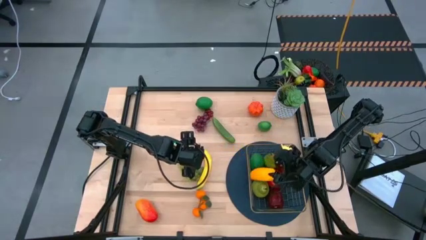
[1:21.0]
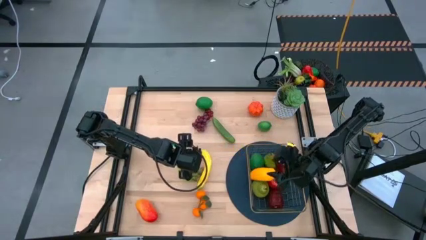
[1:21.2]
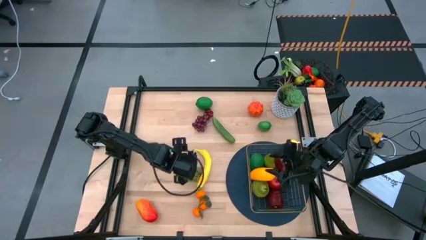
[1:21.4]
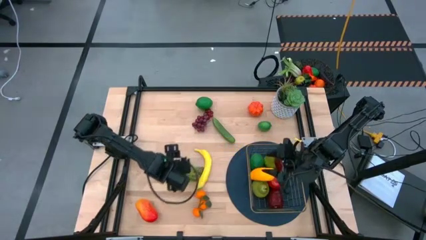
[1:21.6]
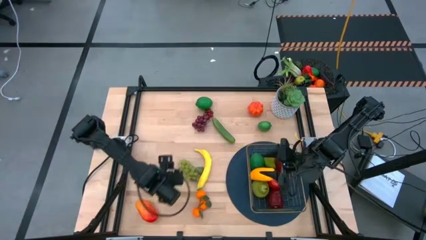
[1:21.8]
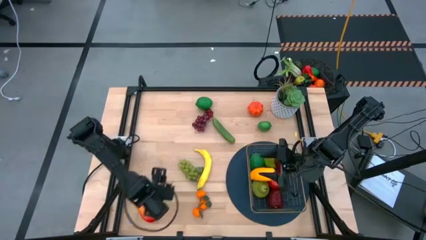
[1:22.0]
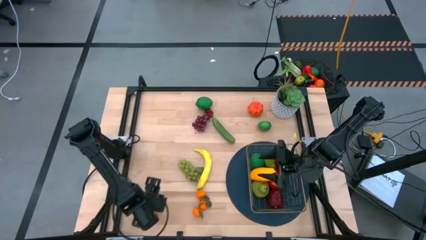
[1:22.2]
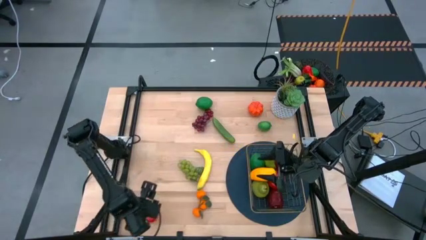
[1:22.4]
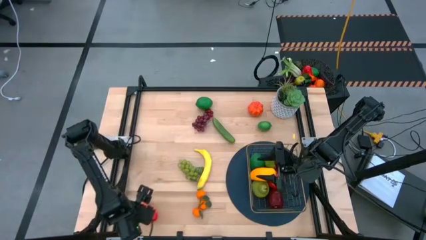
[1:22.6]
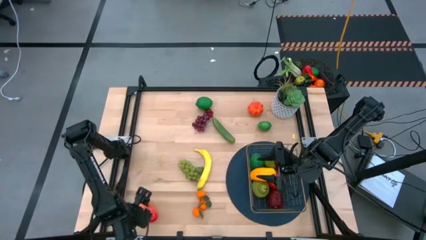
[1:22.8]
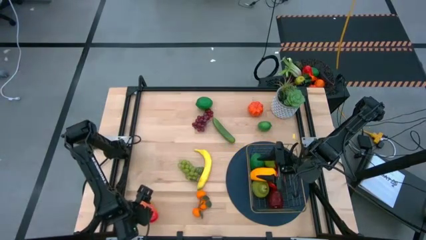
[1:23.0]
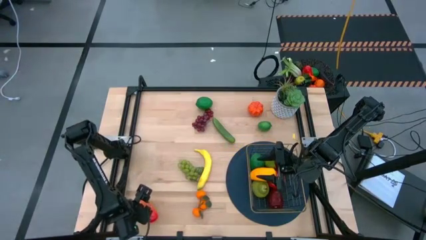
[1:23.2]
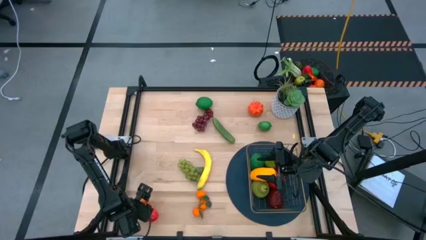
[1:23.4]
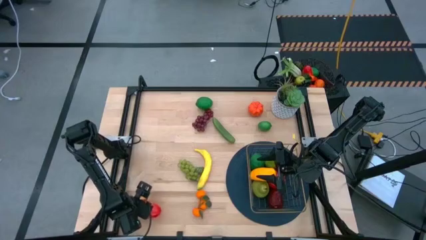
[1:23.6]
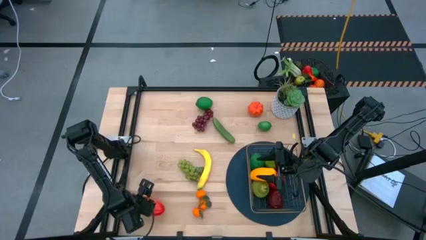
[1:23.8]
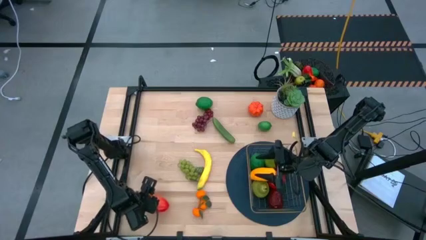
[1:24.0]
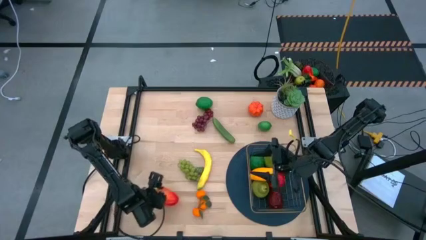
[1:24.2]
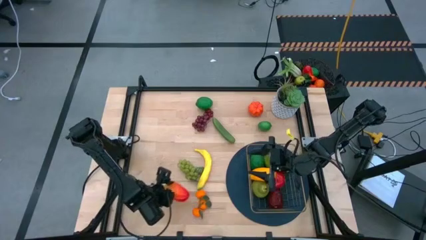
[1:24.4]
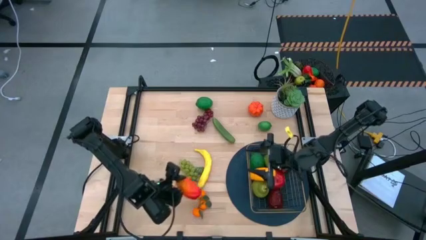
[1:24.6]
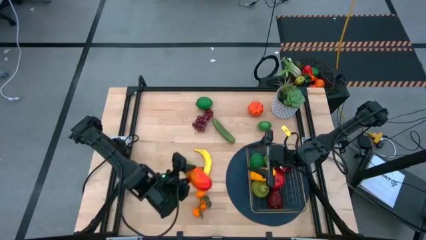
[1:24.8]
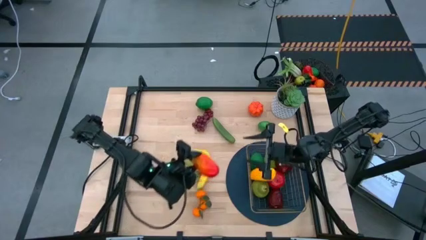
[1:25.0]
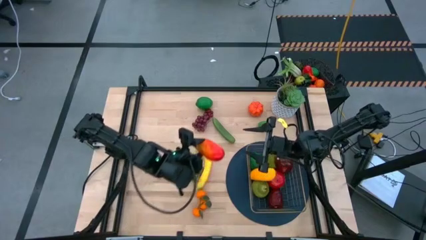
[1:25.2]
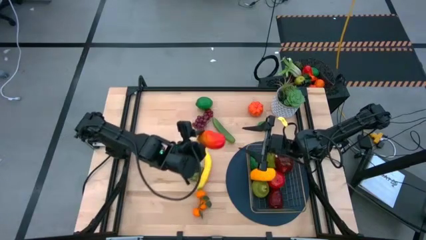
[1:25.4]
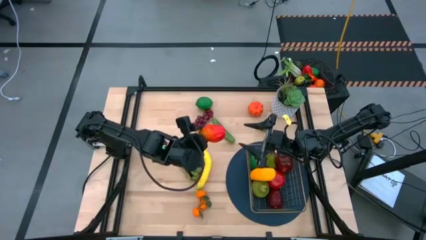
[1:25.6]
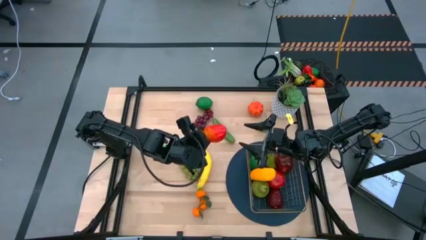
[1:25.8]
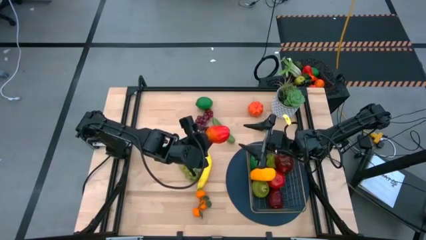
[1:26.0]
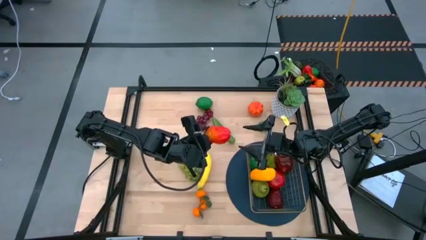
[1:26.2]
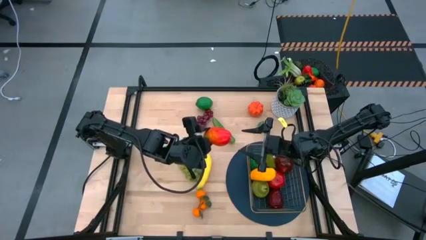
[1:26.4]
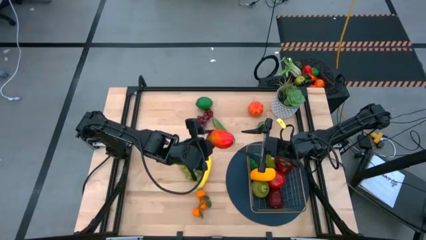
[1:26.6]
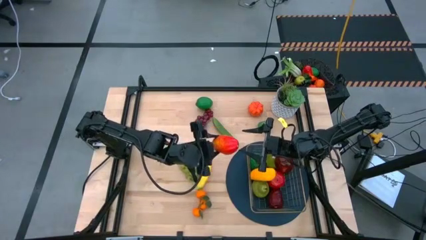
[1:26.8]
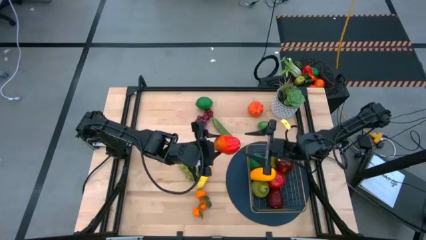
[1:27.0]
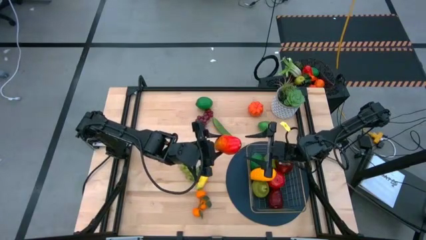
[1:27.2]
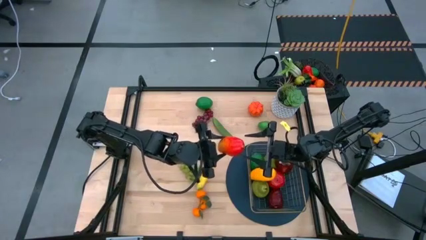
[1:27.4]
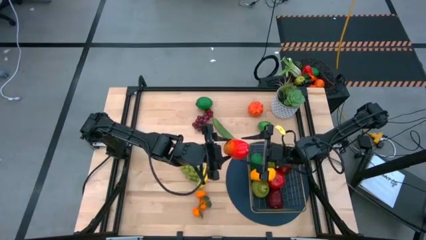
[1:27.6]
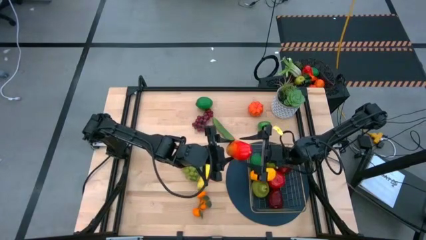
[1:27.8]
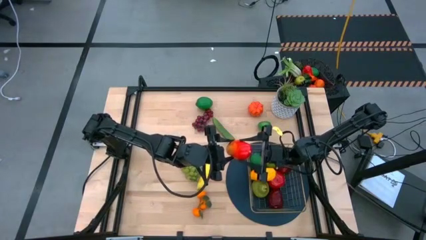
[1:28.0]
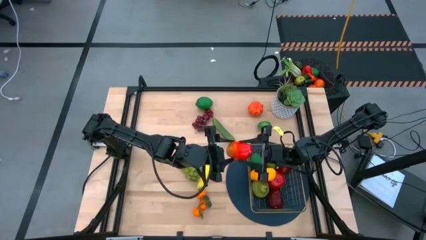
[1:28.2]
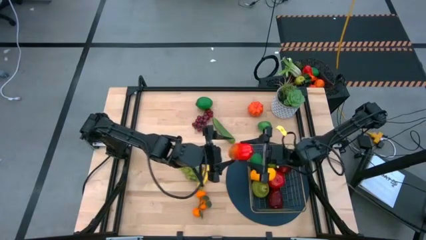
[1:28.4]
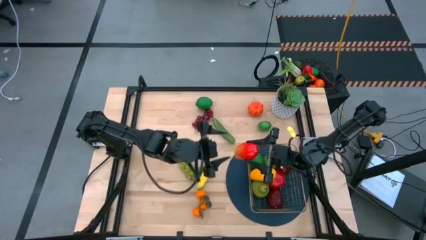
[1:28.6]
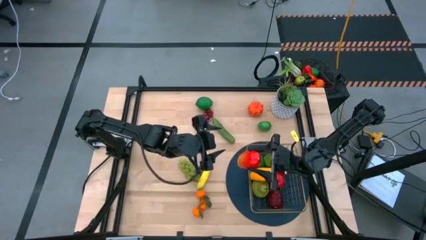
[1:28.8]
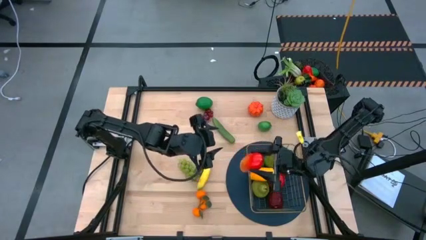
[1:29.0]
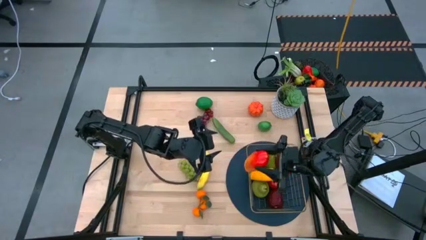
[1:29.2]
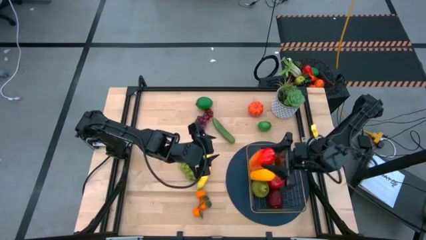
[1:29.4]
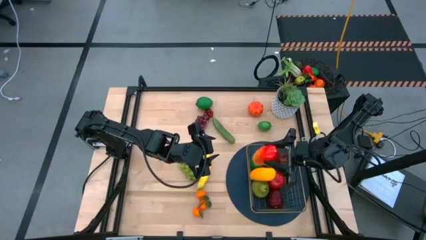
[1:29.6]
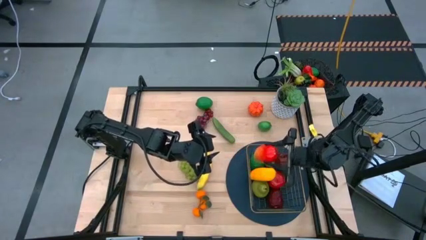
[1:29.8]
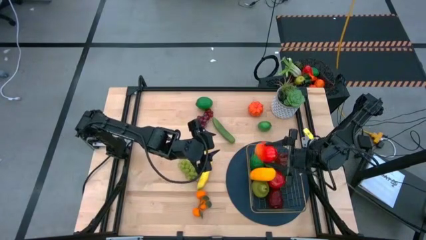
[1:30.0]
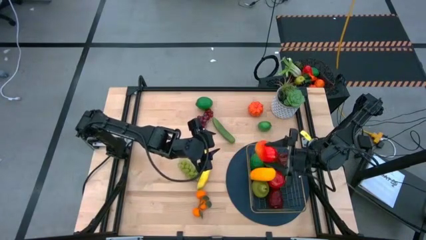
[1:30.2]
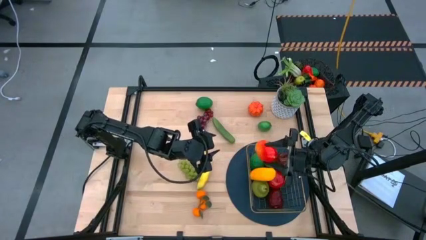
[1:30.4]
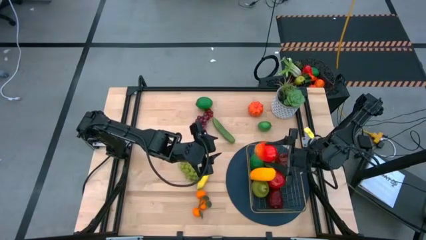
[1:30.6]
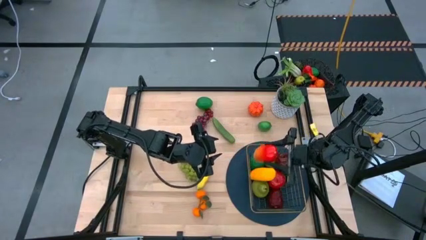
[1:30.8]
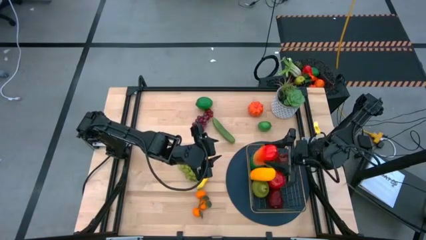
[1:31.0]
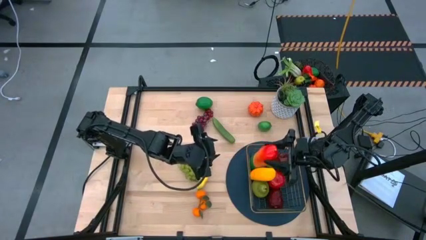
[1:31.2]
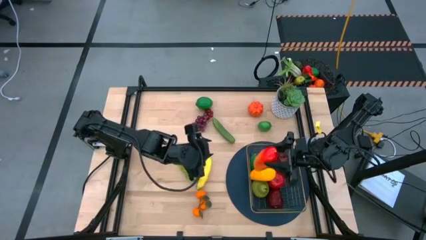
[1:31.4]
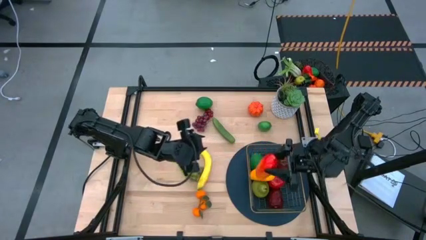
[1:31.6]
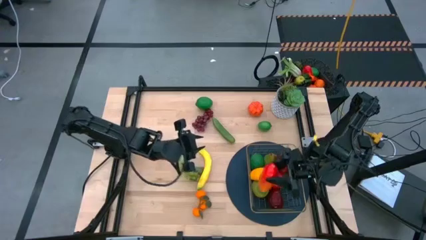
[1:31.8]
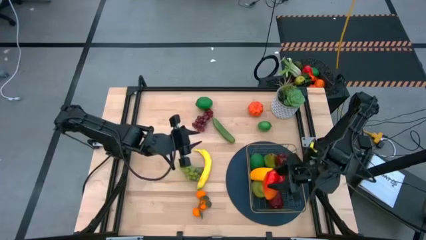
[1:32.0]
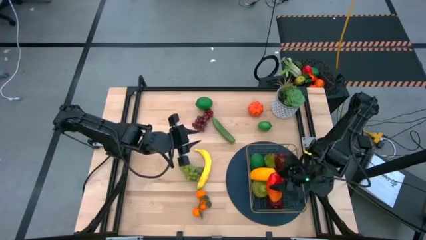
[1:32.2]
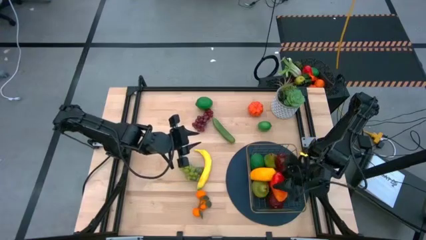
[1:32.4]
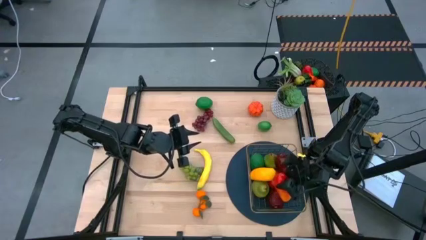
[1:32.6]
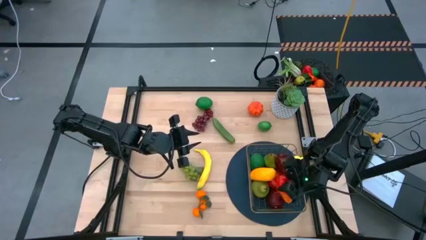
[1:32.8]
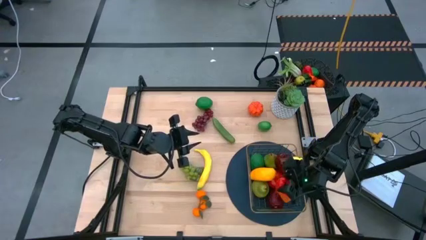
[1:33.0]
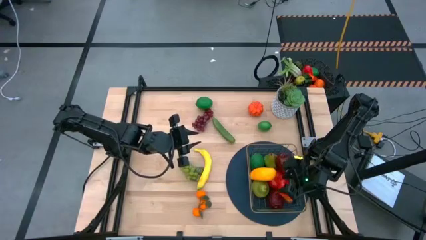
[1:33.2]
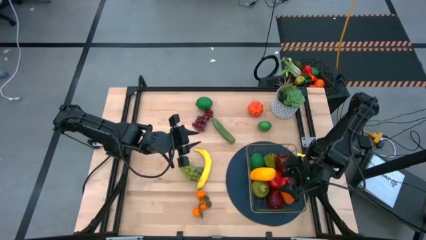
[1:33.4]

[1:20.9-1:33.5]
Task: Build produce basket
Put the red mango into the wire basket

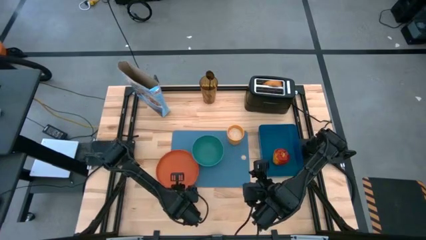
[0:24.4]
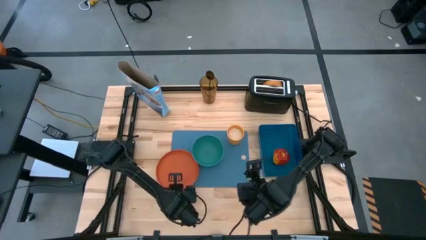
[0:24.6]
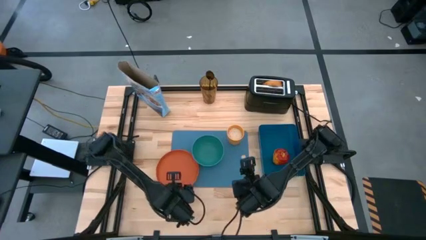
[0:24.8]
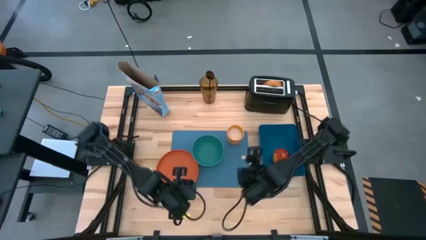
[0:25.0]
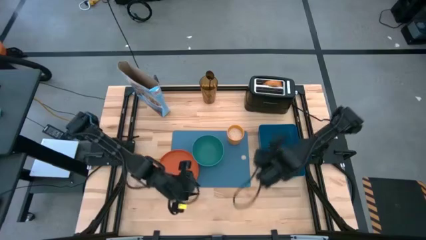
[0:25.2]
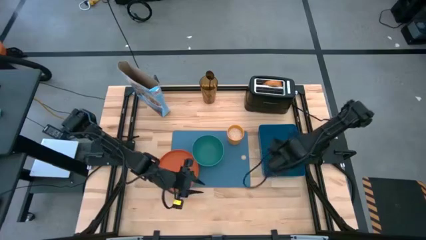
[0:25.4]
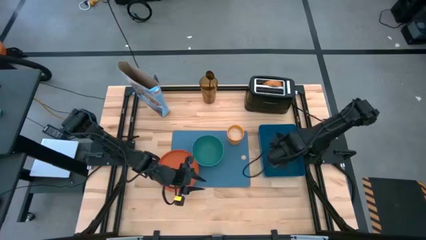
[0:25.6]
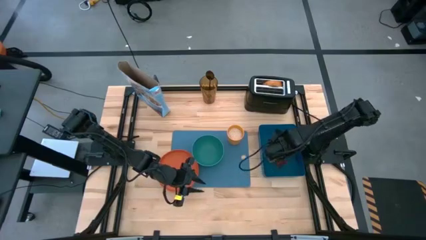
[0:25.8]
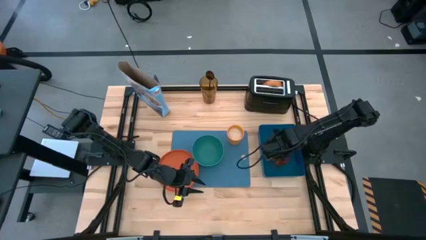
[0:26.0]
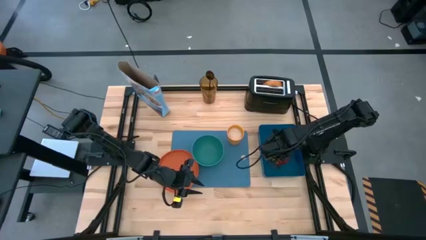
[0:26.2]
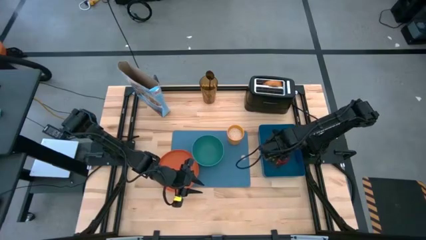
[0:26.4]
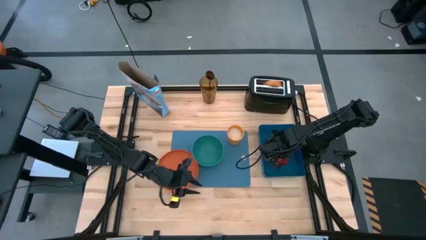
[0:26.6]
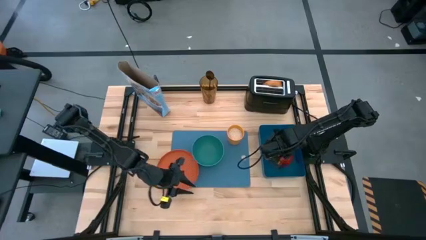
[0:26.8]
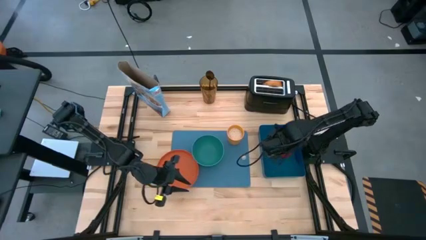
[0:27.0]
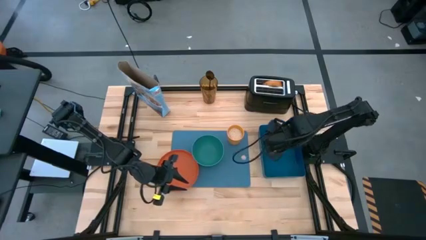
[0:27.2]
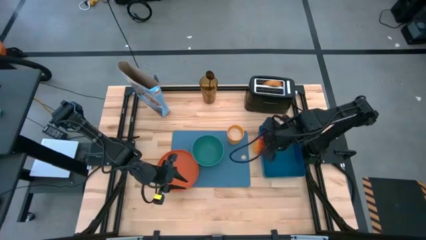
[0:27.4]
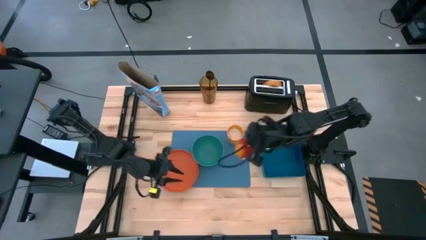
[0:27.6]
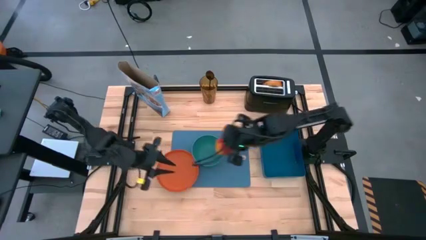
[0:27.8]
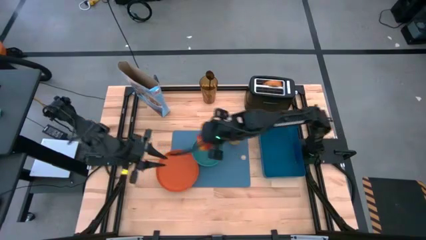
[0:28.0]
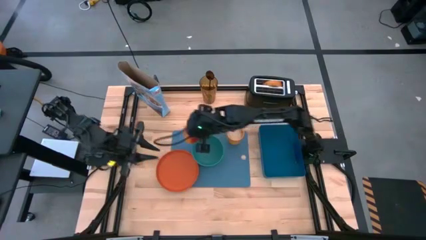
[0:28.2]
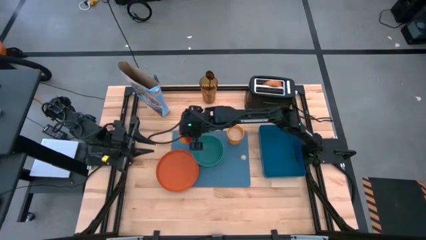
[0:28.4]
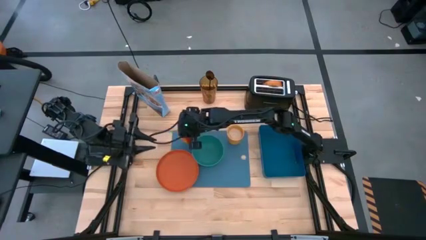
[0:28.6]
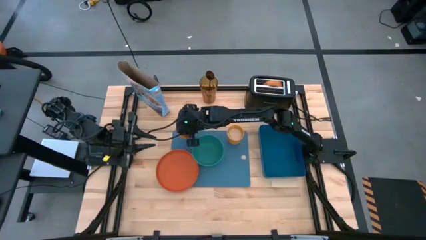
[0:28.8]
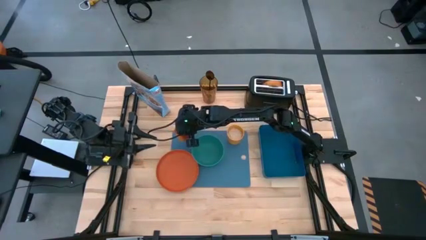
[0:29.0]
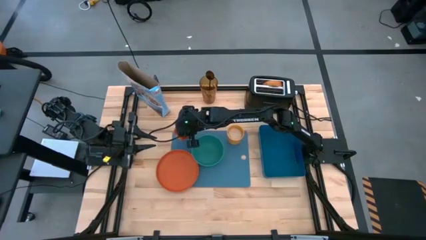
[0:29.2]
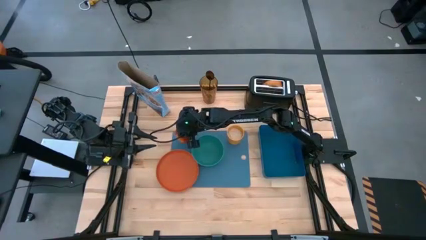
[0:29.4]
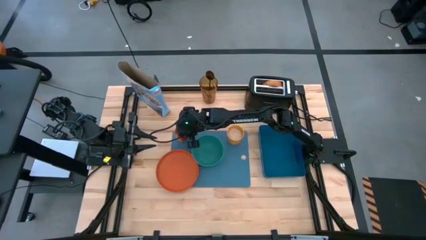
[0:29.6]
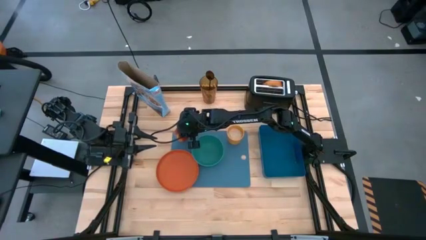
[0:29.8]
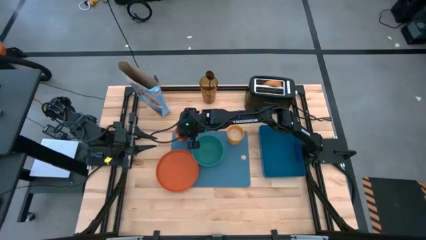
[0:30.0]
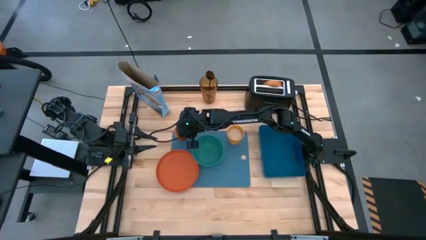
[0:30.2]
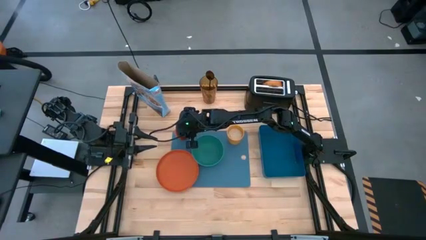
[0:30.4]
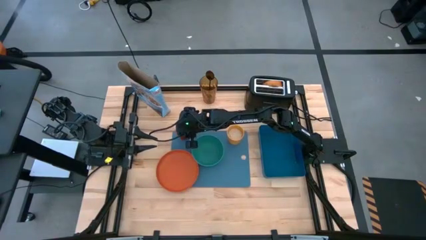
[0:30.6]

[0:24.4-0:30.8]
Task: Arrange a breakfast setting
Put the apple on the light blue mat
